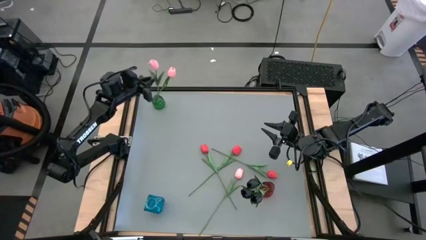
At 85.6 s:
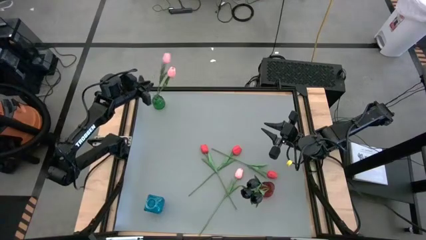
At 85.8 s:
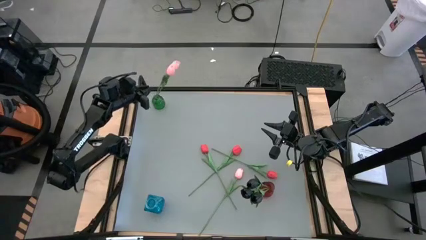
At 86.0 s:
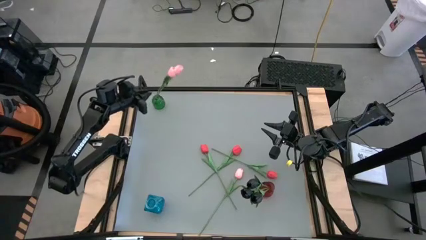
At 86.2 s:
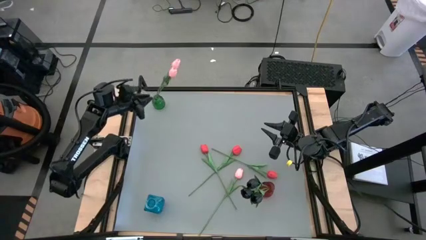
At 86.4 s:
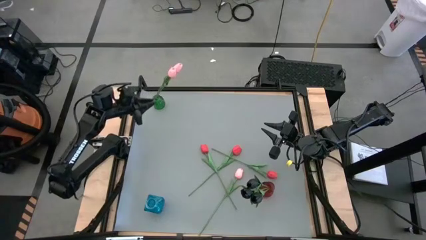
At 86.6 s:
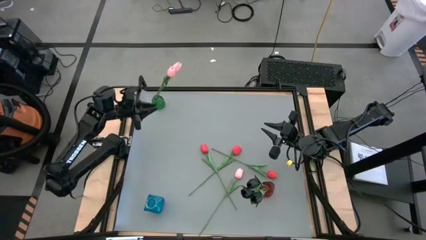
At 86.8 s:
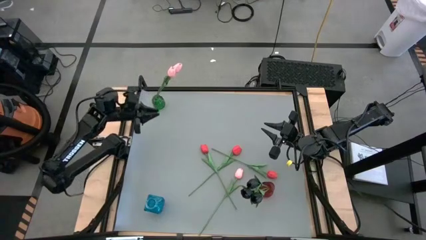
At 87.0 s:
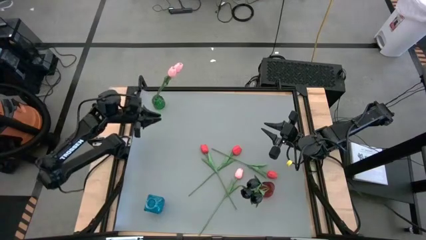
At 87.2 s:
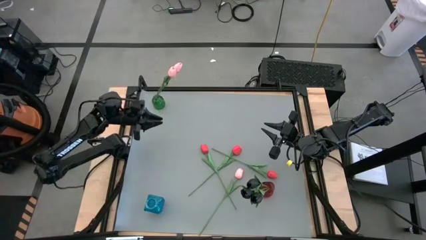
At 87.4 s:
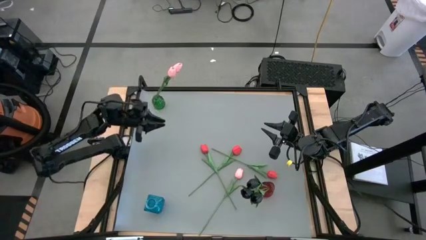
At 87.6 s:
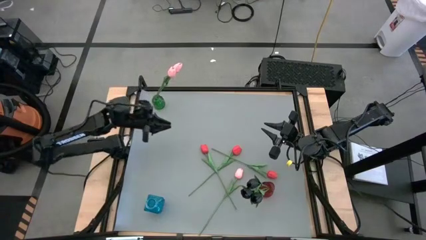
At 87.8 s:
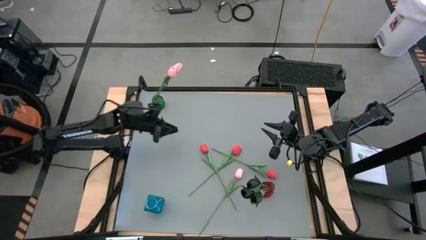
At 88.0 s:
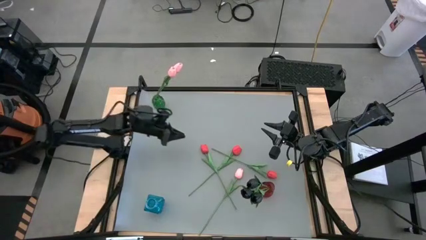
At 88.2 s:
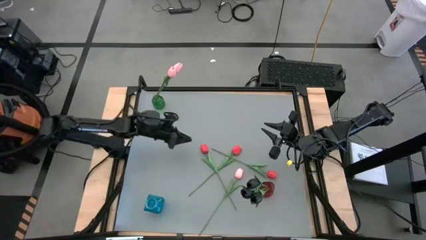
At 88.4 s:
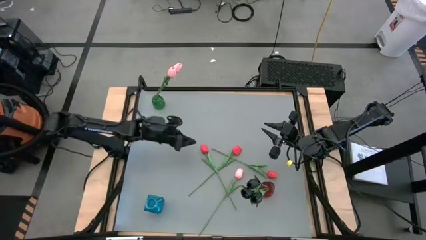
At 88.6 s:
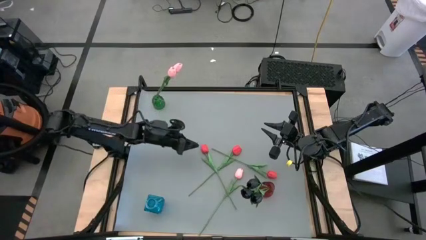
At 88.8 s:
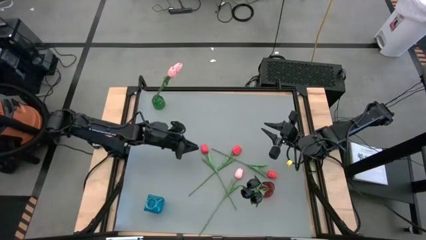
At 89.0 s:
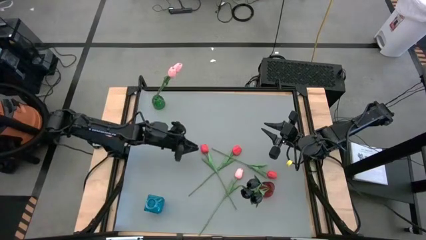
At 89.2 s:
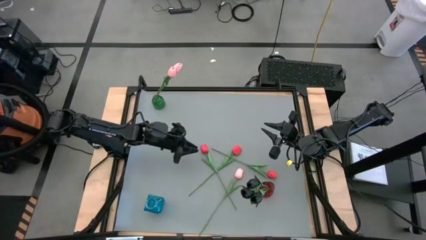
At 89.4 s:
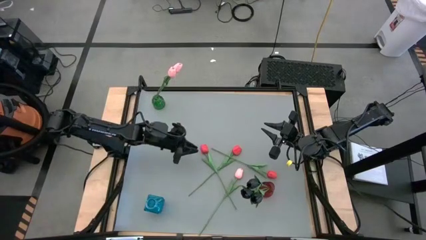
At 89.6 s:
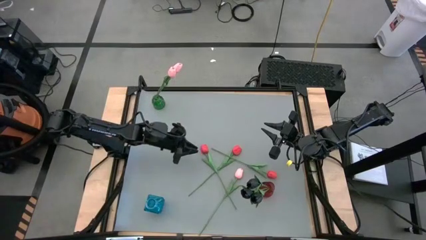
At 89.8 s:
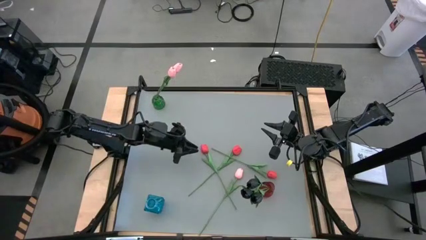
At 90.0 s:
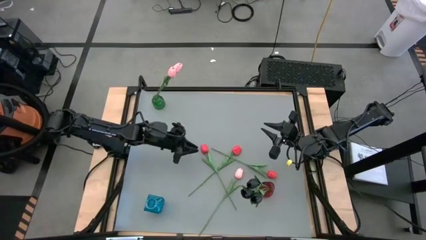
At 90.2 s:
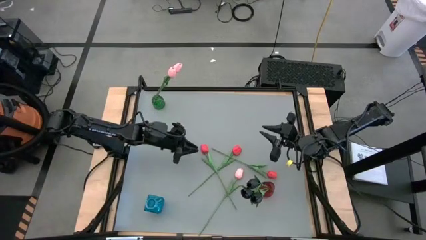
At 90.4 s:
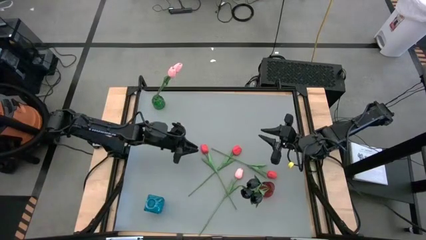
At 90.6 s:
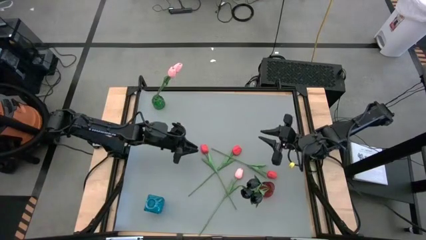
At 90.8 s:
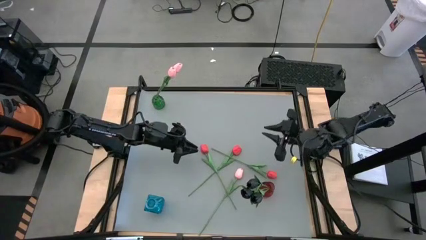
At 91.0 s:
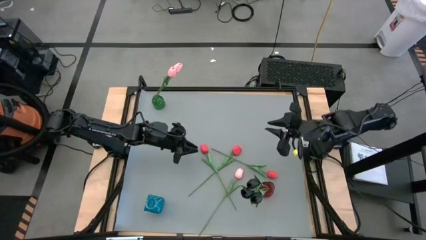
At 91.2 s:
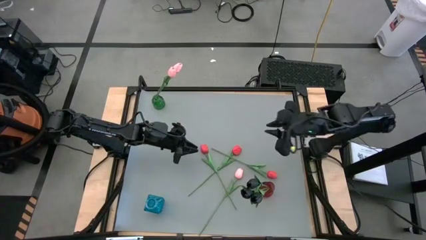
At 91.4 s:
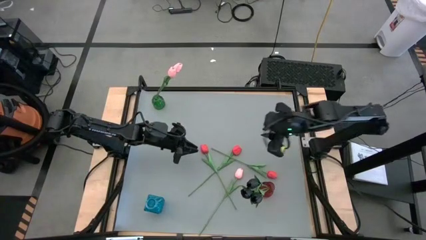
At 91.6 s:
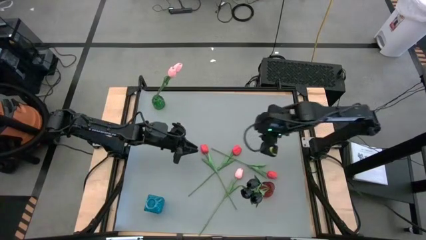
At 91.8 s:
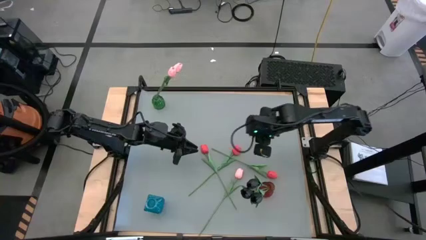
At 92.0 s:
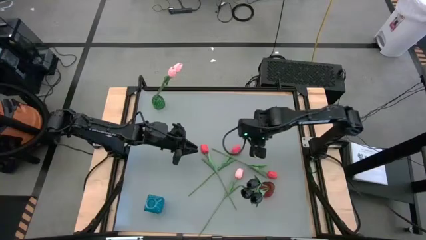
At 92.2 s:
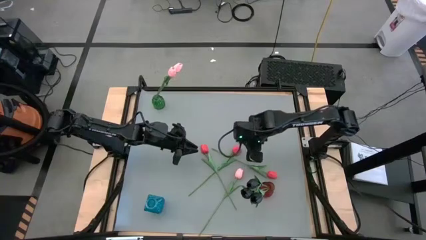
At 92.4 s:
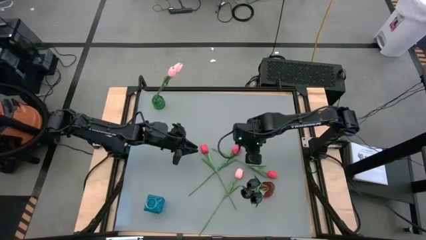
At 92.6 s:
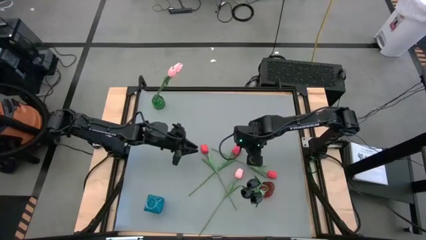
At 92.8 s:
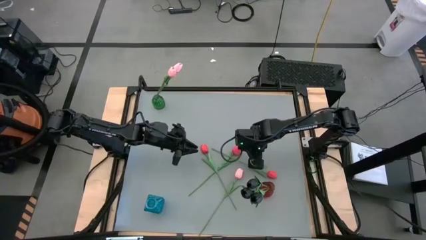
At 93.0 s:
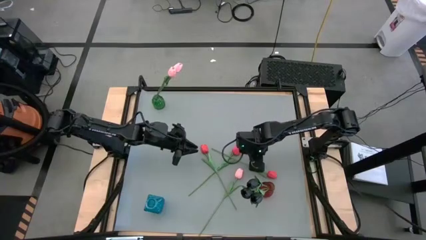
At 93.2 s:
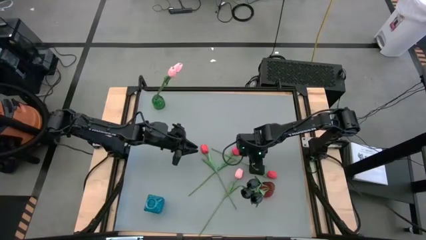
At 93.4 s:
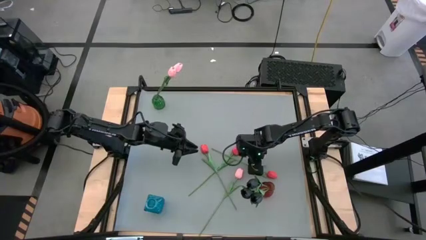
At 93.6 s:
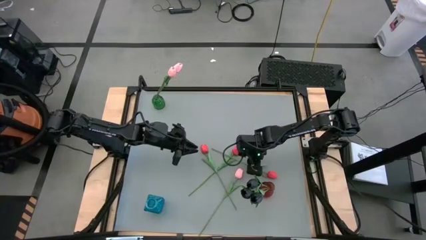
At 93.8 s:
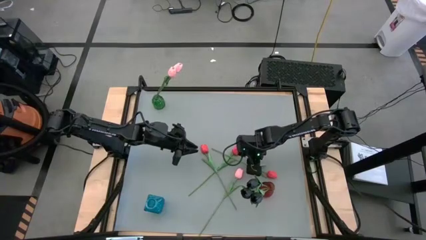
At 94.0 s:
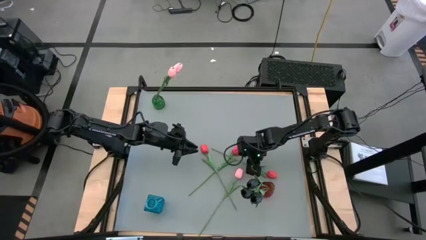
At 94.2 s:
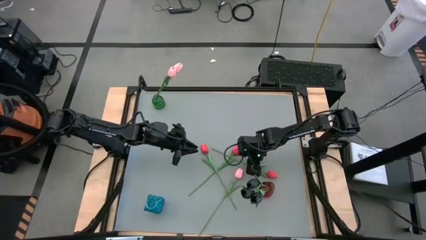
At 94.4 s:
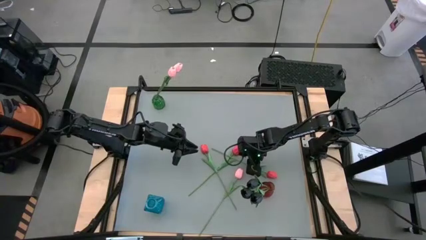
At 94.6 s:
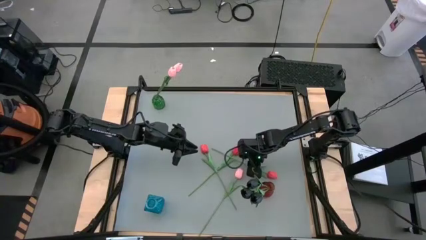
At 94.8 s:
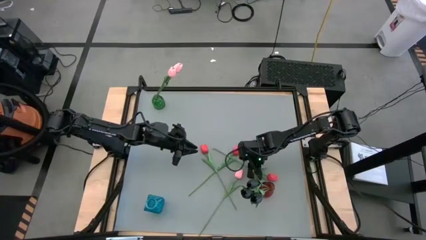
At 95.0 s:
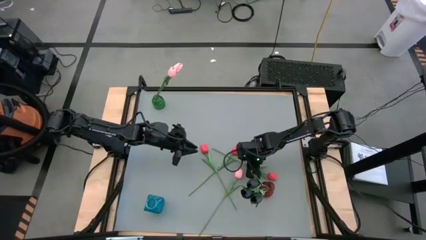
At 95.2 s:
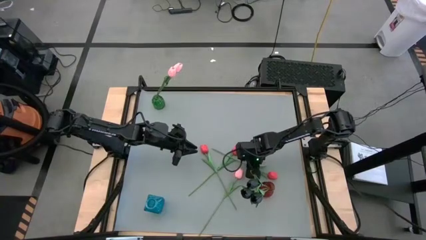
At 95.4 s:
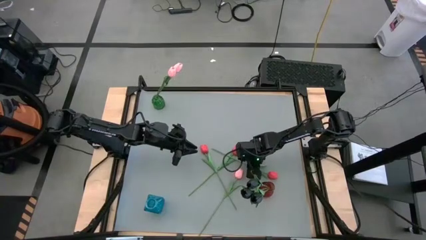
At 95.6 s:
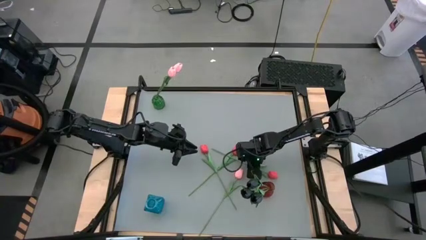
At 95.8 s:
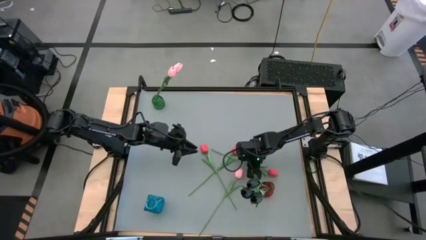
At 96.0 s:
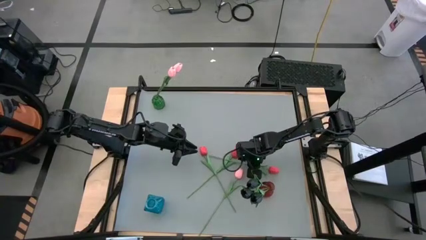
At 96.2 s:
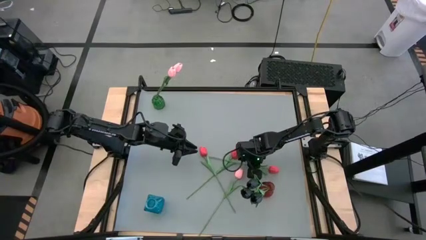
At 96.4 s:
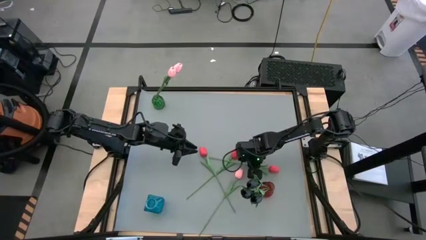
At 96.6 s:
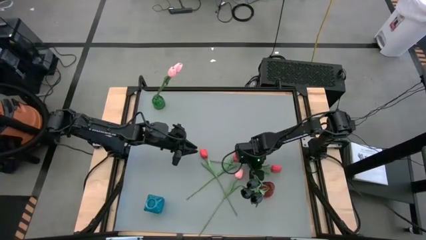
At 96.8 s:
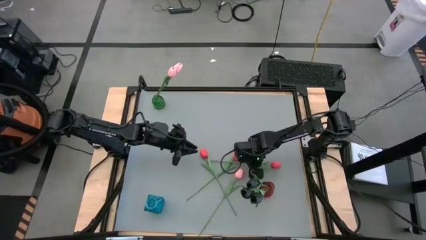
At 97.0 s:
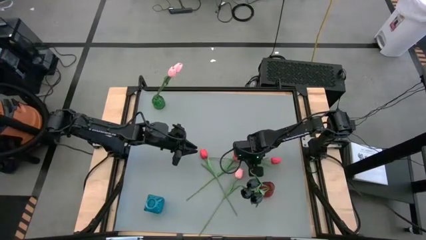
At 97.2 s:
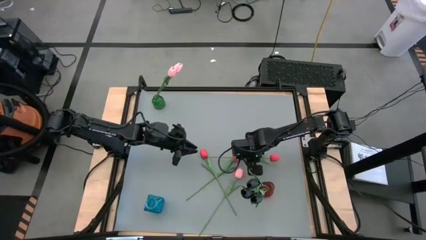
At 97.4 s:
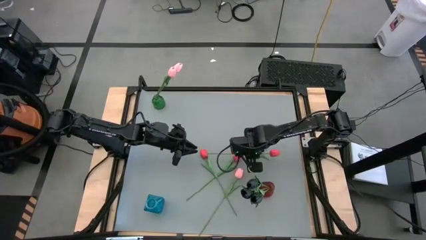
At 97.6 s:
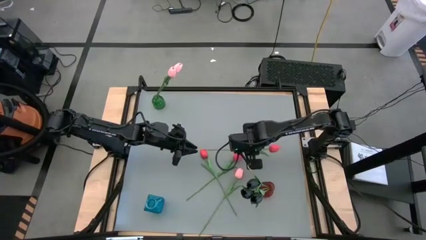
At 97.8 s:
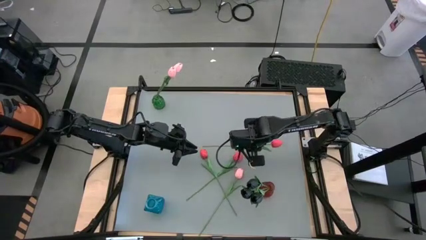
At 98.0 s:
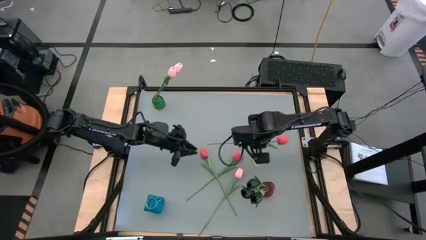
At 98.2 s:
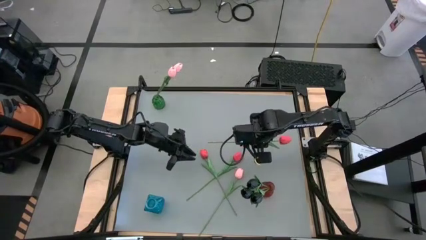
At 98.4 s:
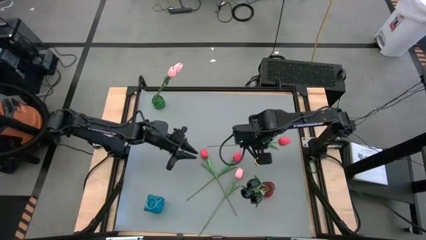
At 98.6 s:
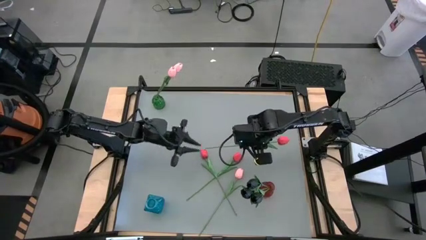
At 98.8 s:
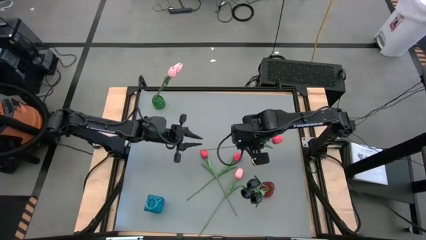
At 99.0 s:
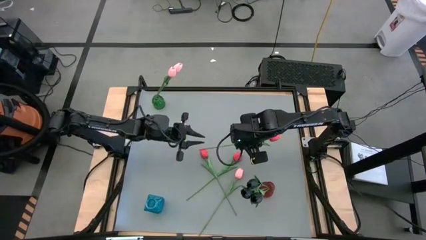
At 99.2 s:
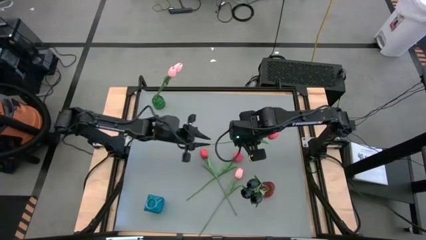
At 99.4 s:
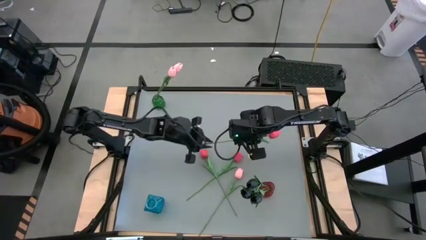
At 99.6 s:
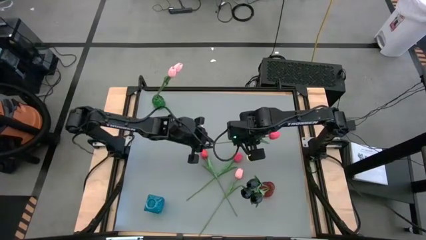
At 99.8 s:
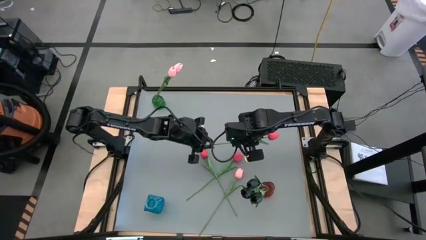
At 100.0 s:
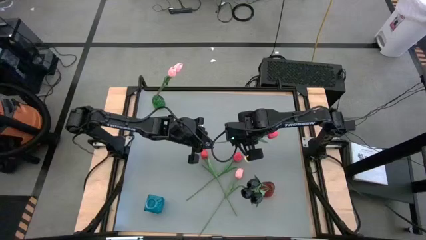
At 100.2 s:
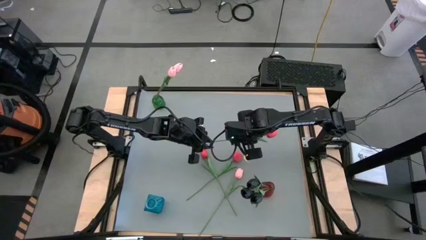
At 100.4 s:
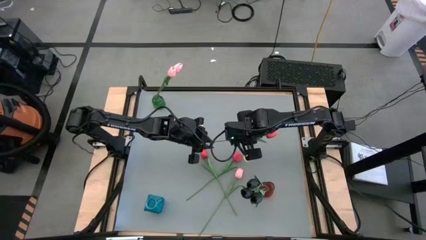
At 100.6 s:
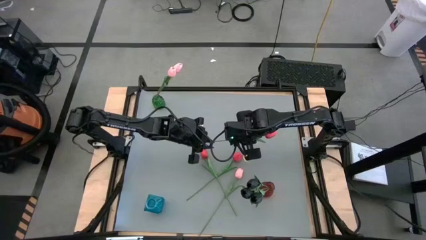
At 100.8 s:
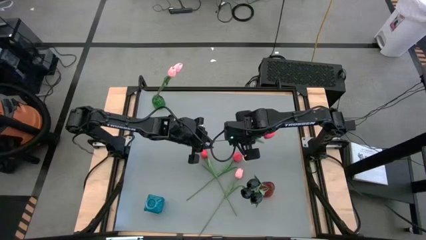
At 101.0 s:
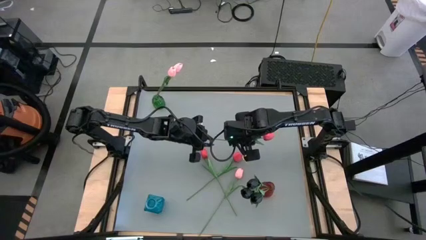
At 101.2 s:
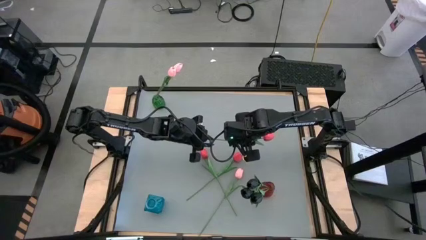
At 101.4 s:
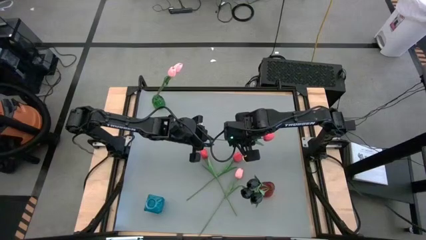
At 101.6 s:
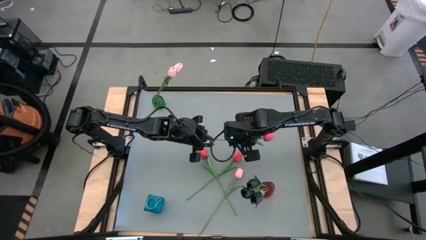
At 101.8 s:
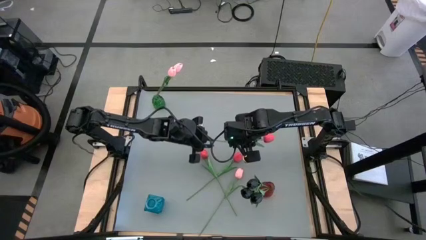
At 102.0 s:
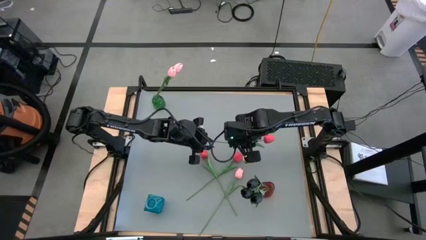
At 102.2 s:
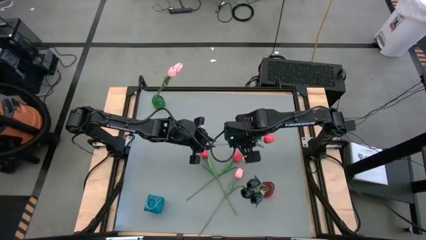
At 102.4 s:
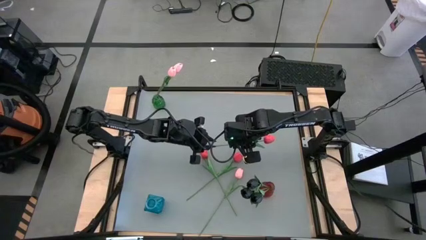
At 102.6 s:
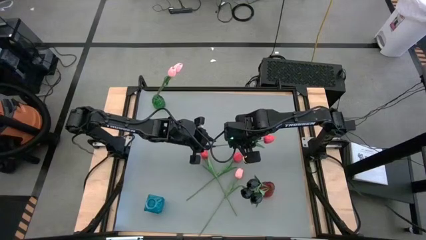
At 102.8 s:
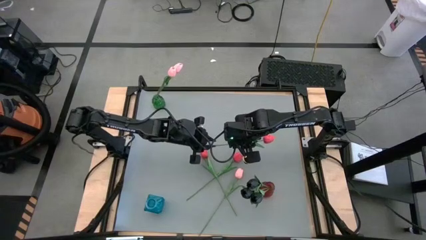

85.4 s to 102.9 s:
Task: Sort flowers into vase by color
Put the right red flower into the blue vase
